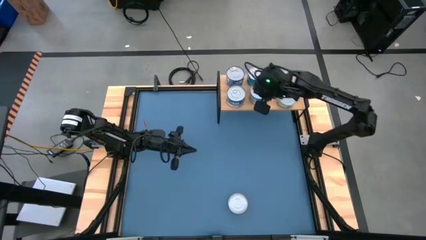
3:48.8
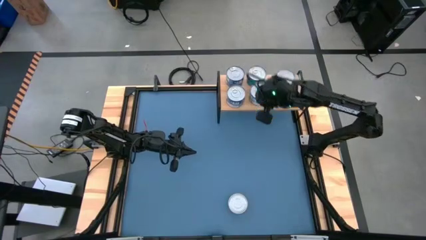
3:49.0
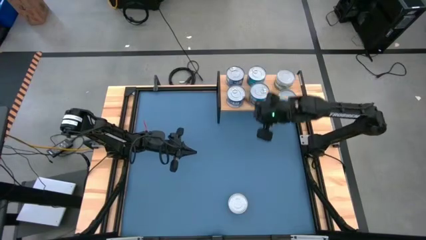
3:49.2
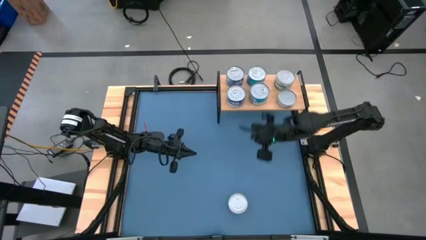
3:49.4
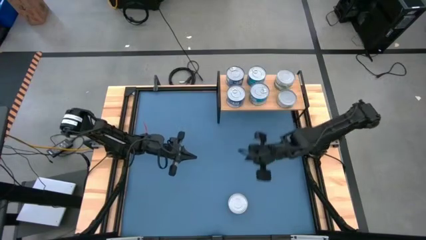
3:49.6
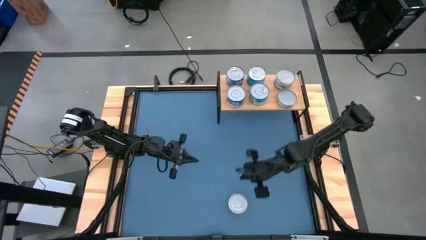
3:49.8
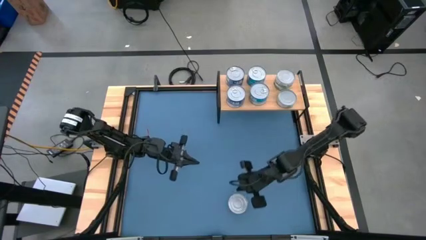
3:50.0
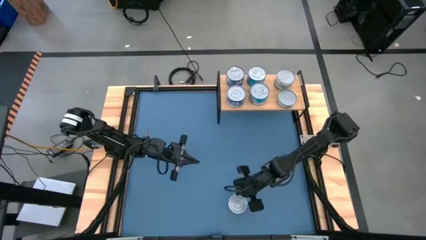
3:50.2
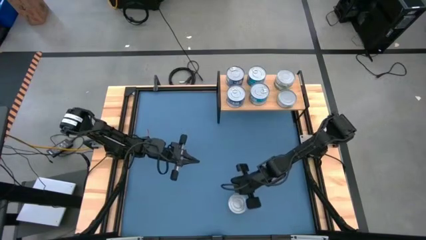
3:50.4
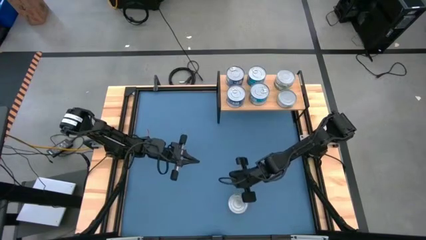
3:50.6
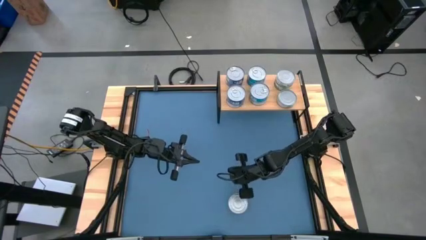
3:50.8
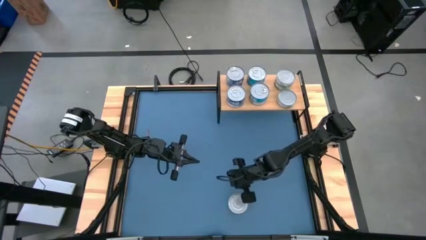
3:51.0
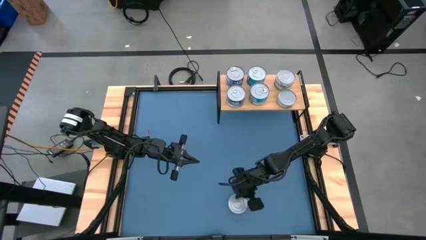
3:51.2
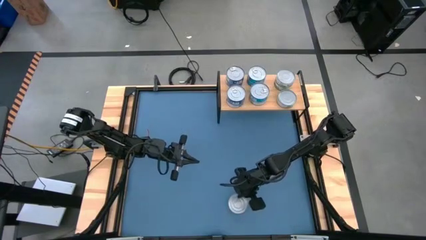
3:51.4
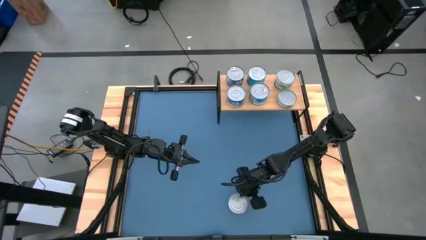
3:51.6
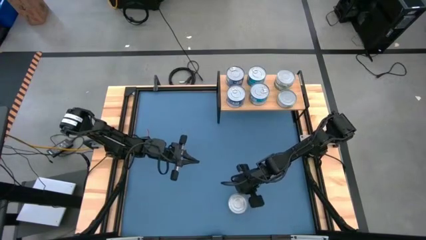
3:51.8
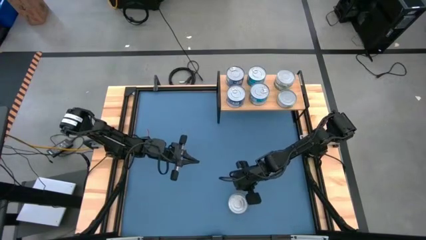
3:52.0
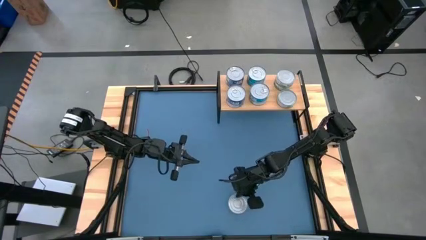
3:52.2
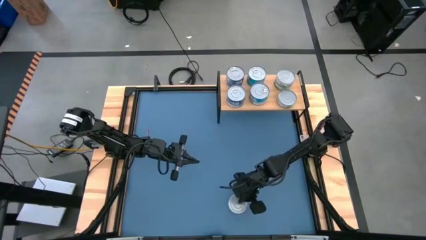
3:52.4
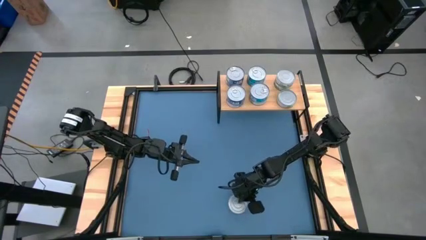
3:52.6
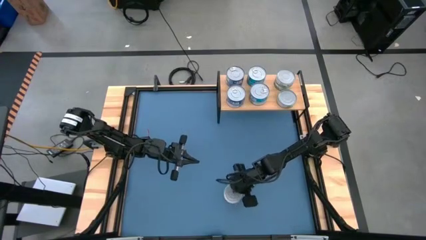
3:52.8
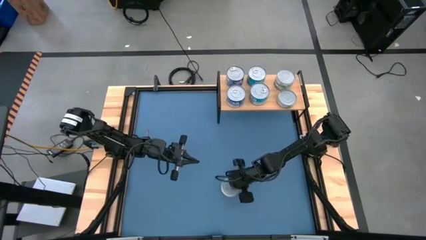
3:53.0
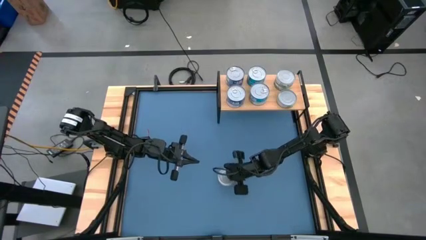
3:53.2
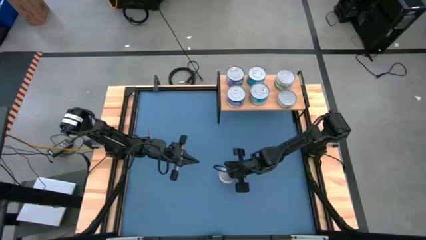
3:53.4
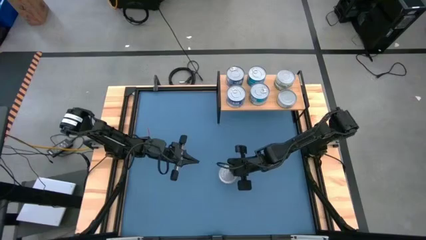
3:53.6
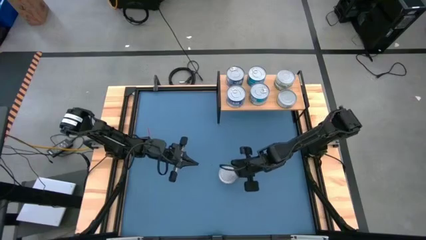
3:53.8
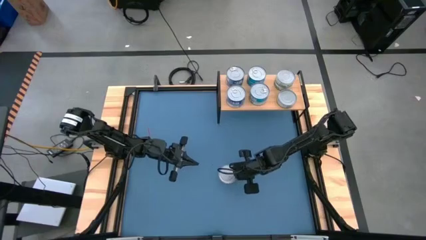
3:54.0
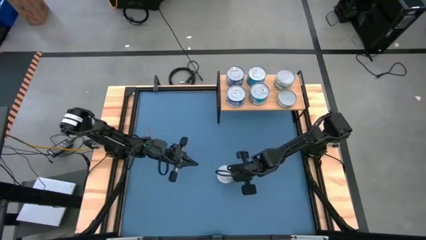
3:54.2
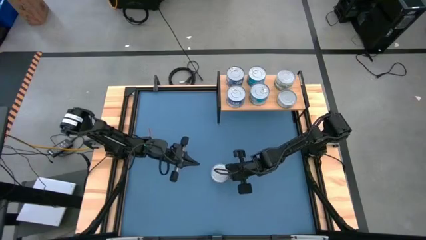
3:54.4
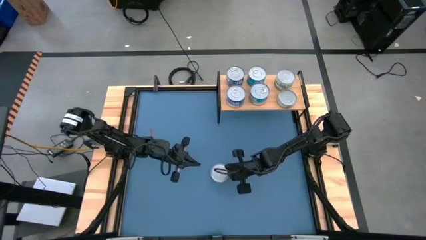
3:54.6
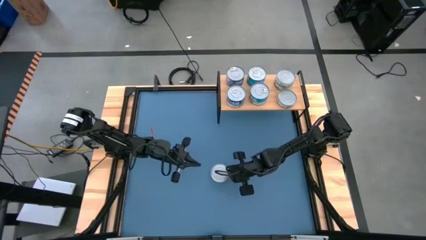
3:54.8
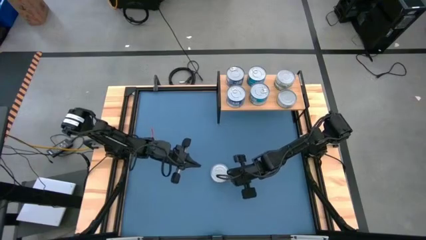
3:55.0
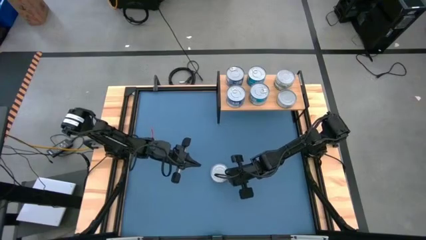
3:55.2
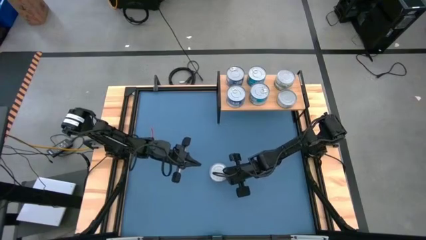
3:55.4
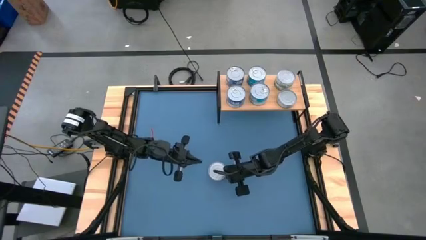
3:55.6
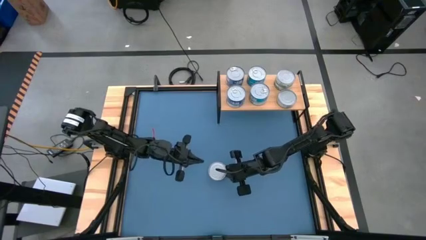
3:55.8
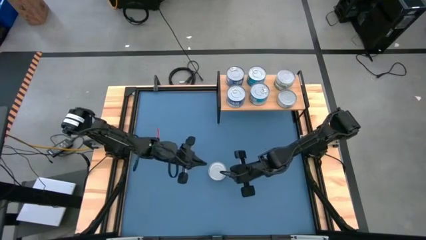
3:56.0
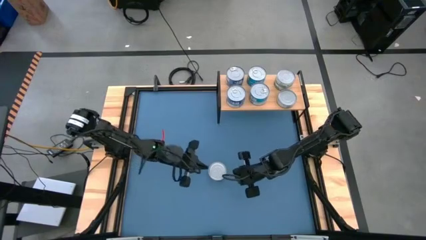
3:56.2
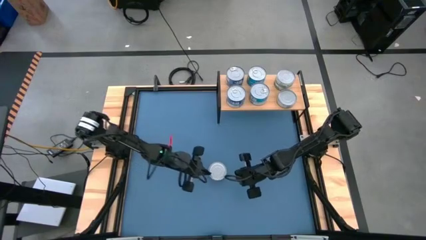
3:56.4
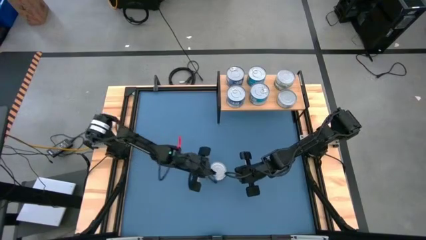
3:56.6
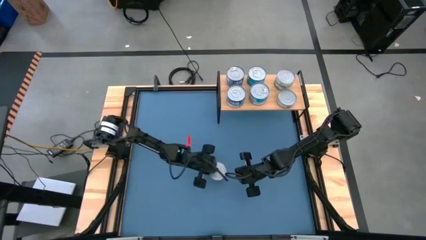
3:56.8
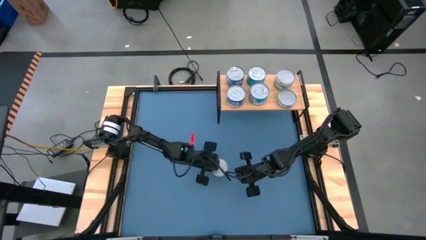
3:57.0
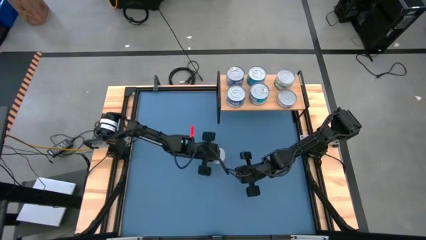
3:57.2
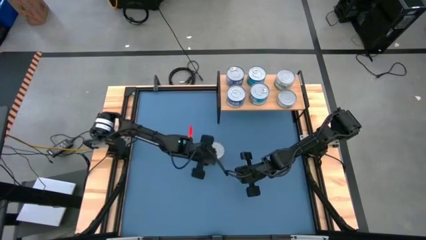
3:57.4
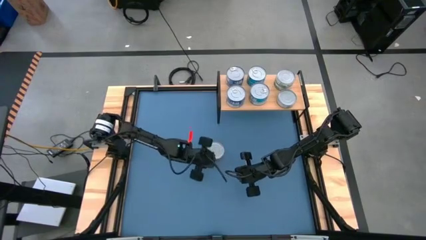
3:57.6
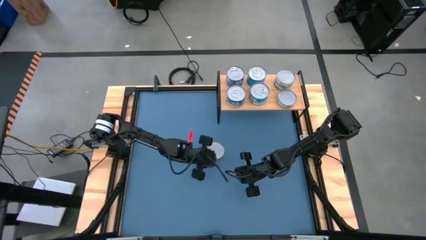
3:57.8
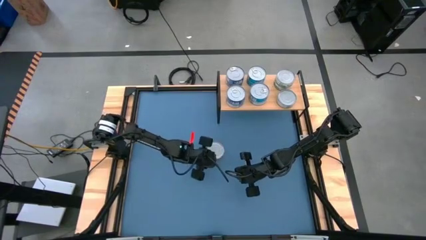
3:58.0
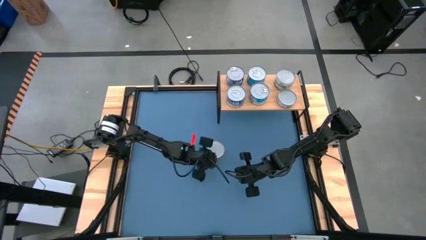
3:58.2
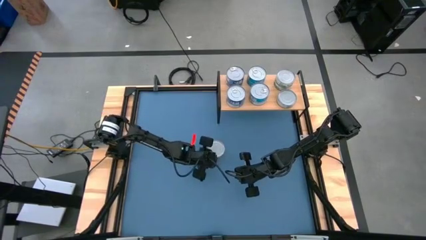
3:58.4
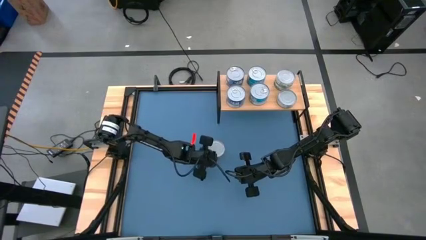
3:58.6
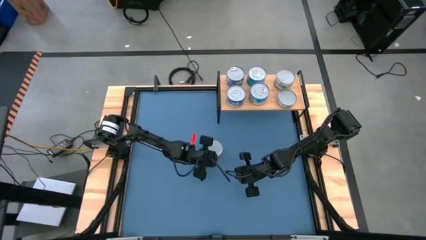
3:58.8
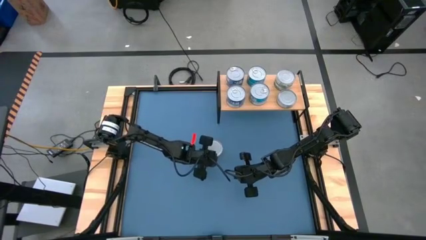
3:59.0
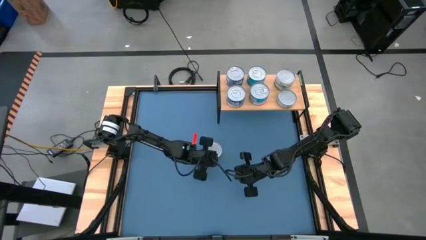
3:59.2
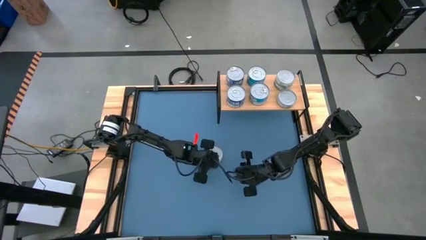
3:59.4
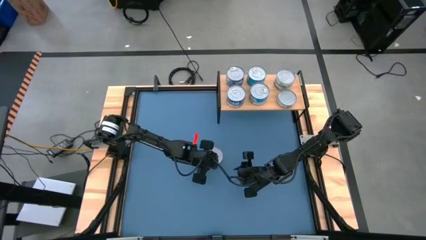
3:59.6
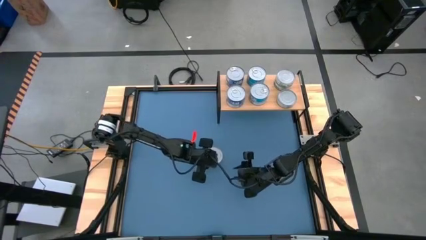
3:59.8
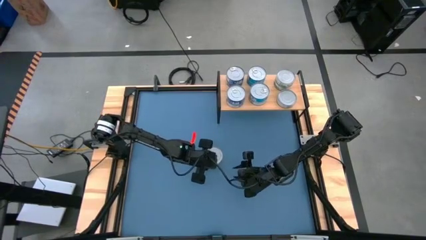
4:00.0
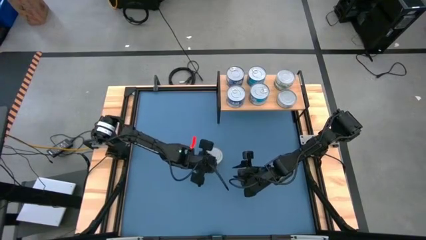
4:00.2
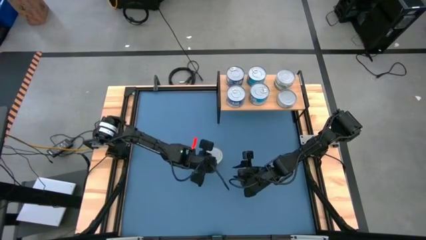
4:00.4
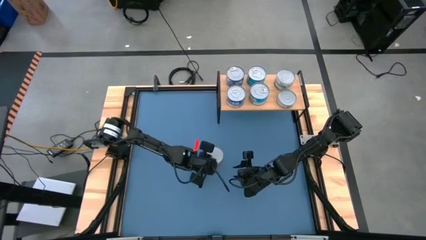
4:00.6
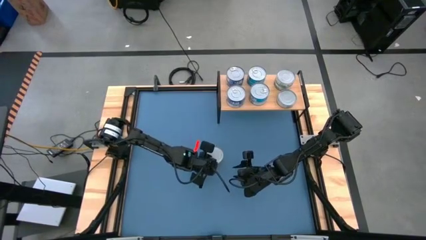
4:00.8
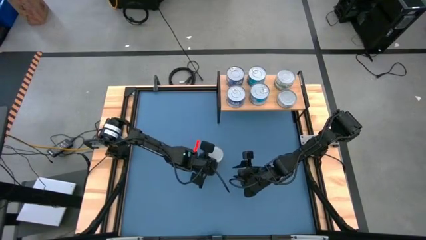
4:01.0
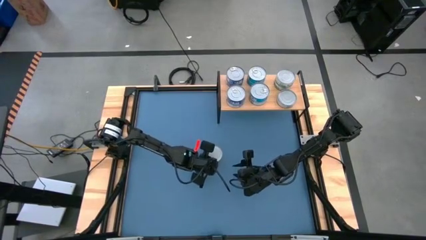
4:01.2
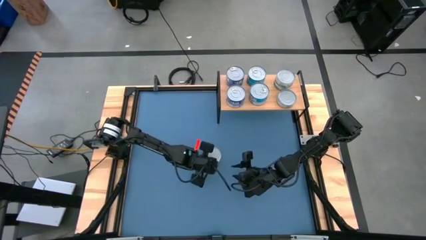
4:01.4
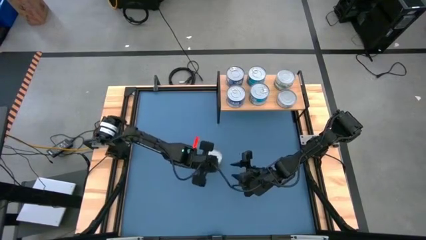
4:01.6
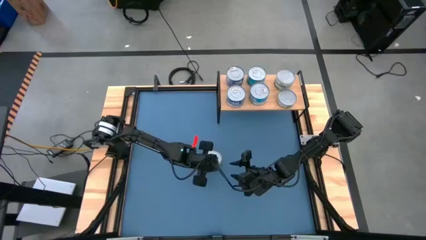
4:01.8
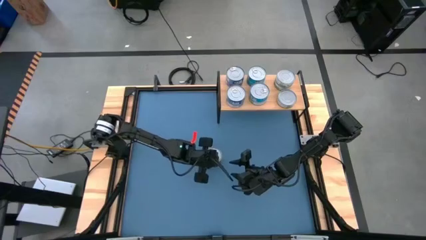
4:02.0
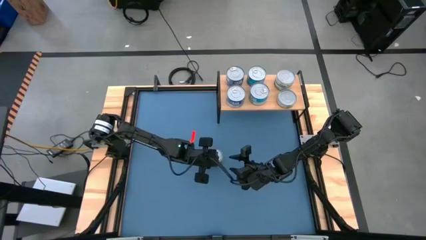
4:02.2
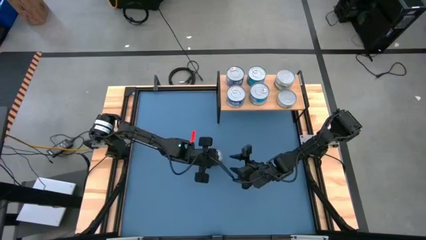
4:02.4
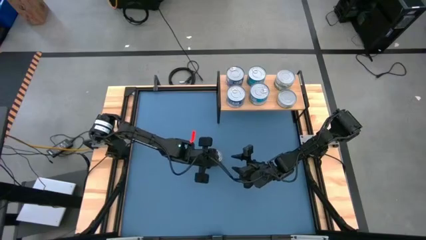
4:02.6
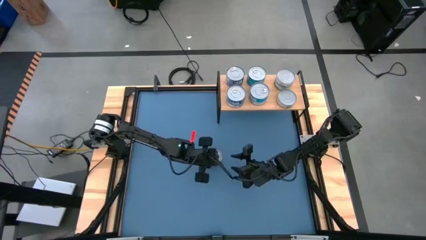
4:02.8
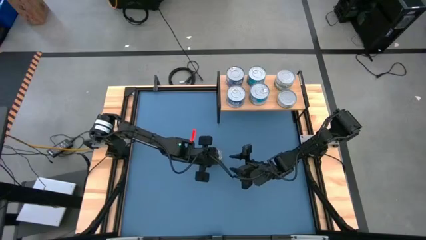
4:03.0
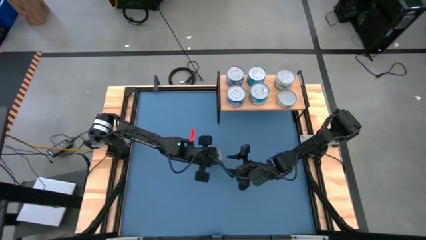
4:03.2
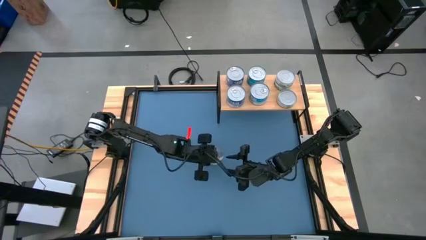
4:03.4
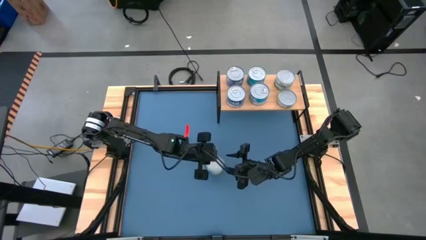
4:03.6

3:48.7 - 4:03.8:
Task: Stack canned seafood by type on shelf
Stack the green tuna can on top of the green tuna can on the shelf

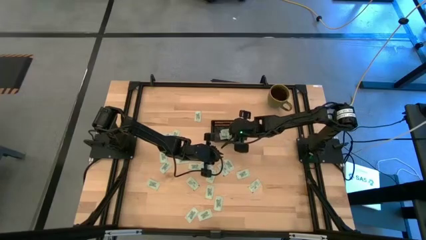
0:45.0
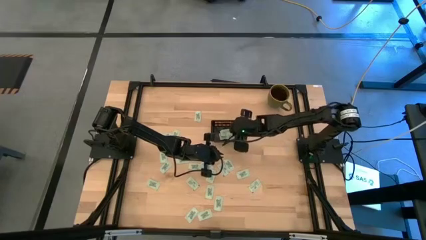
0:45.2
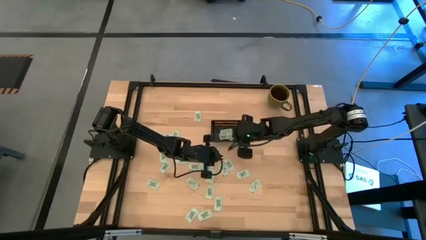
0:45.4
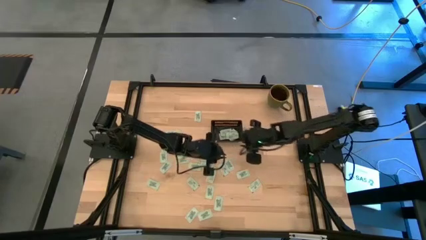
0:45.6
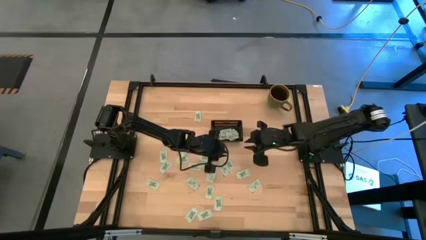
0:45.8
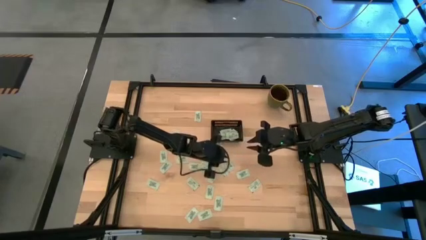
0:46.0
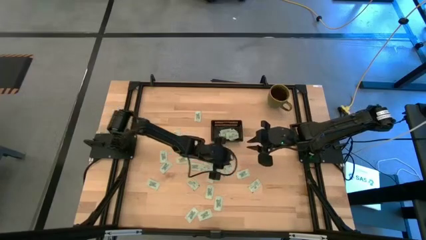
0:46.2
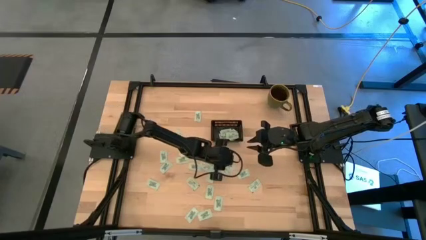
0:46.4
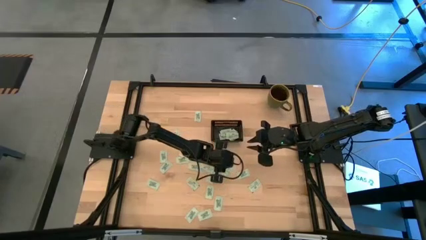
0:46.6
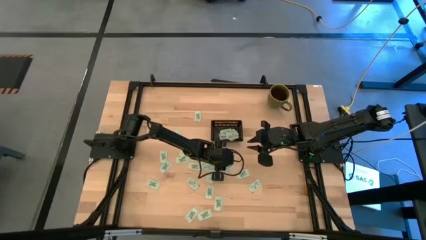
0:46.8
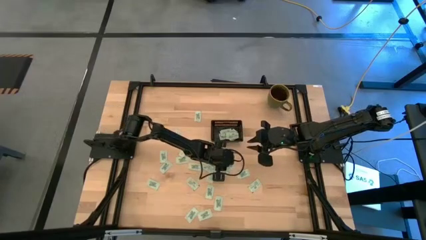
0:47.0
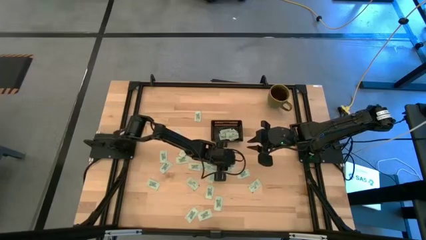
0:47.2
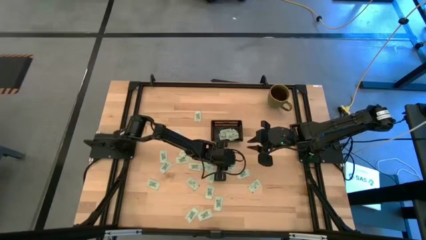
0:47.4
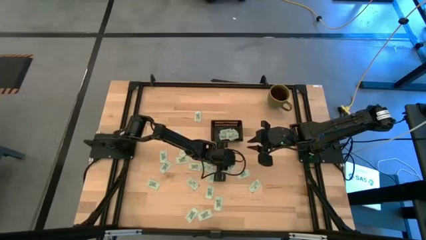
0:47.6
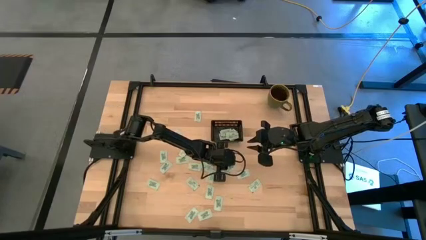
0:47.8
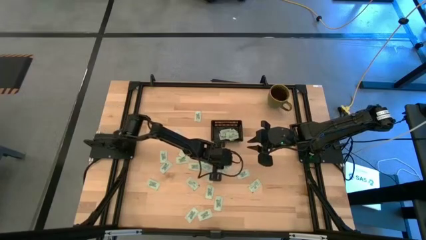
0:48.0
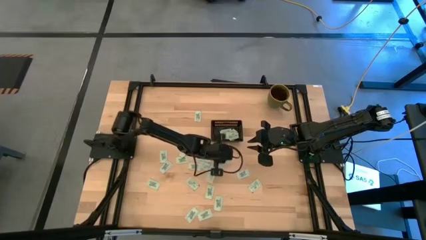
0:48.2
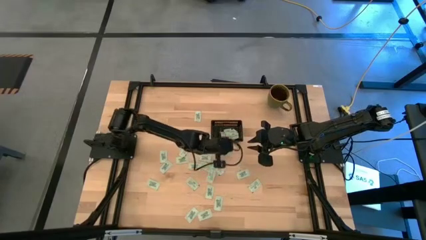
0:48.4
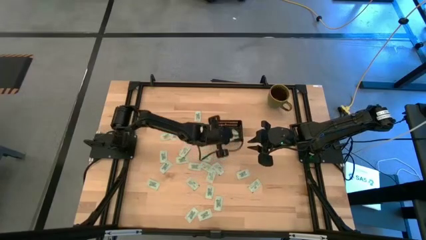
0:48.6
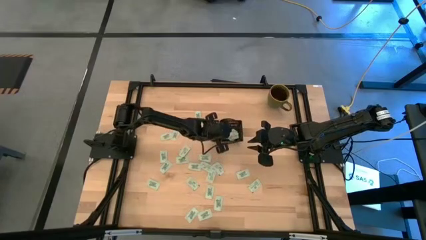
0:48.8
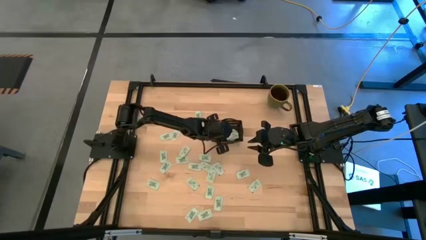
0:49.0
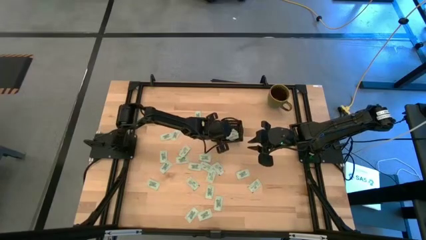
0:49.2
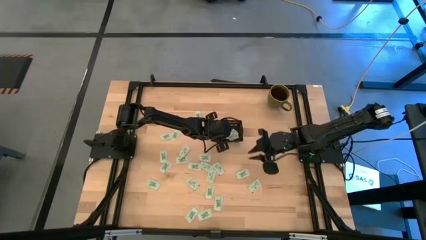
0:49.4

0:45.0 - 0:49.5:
Task: Pick and place Stevia / Truvia into bins
Put the stevia packet into the black basket
